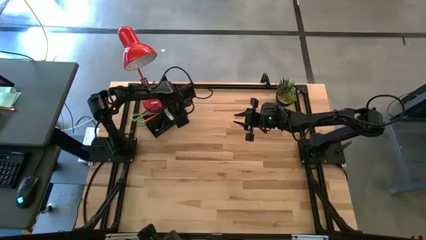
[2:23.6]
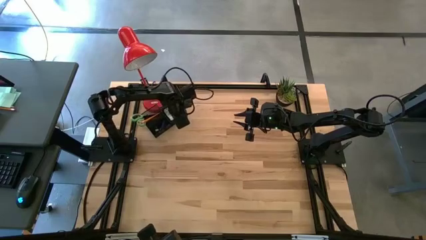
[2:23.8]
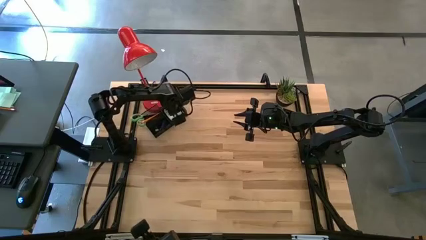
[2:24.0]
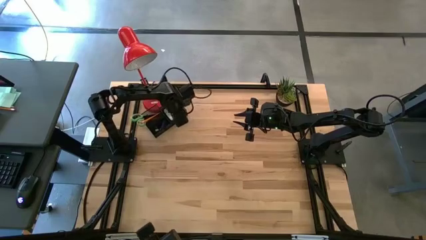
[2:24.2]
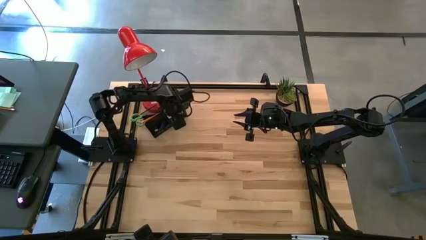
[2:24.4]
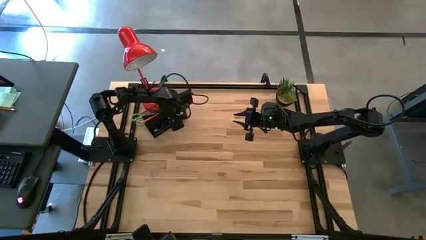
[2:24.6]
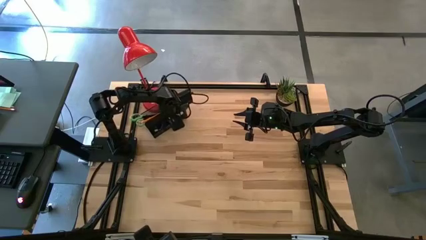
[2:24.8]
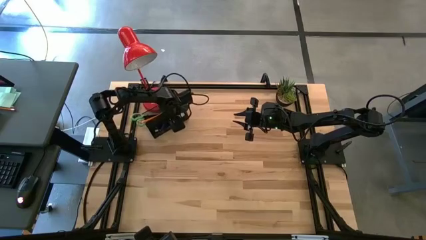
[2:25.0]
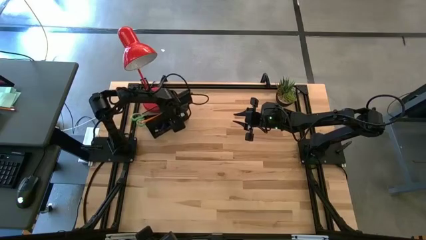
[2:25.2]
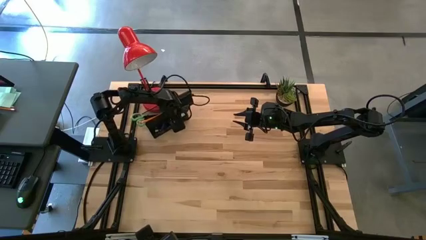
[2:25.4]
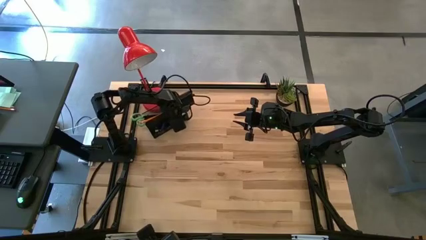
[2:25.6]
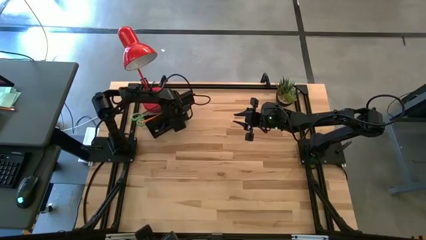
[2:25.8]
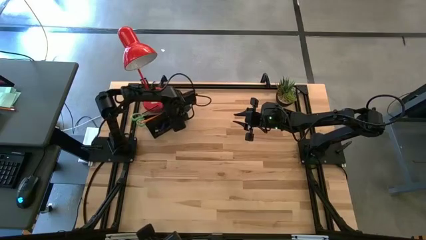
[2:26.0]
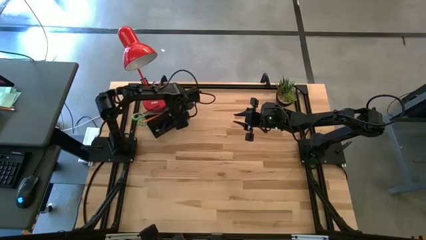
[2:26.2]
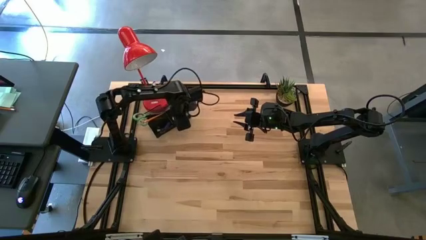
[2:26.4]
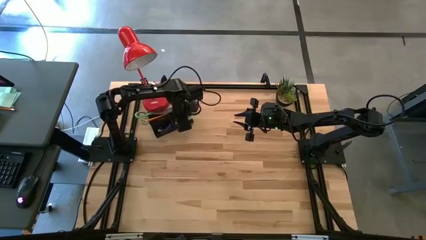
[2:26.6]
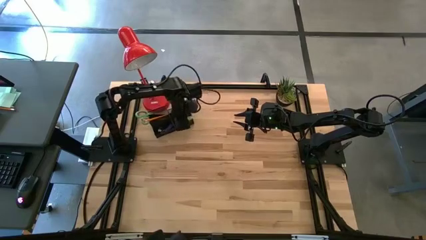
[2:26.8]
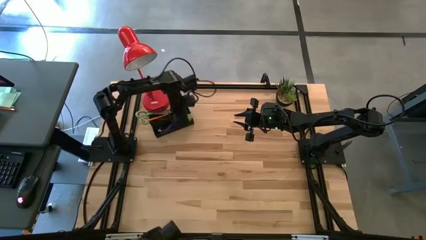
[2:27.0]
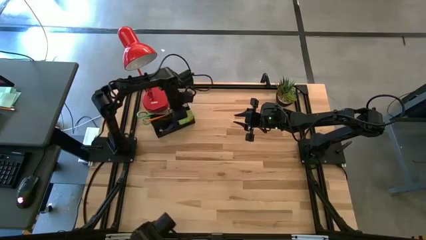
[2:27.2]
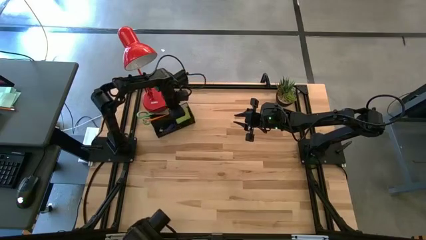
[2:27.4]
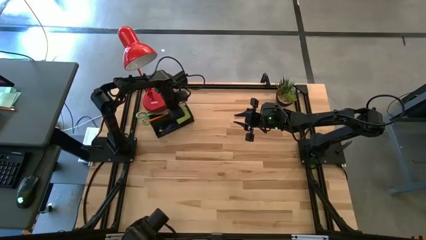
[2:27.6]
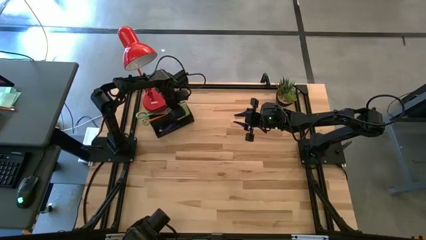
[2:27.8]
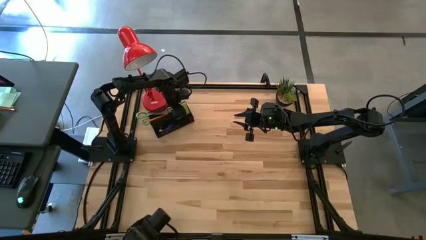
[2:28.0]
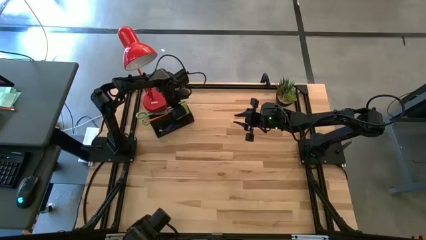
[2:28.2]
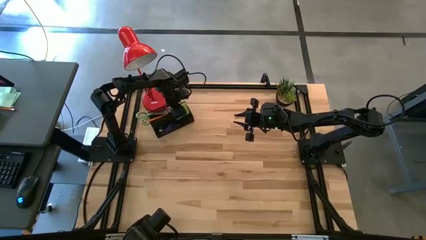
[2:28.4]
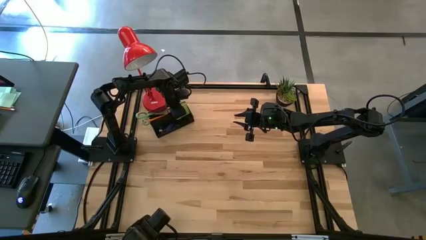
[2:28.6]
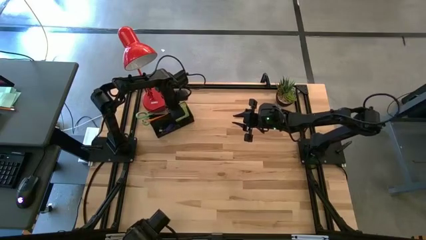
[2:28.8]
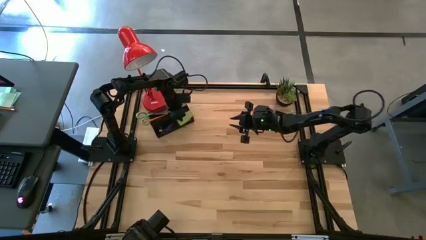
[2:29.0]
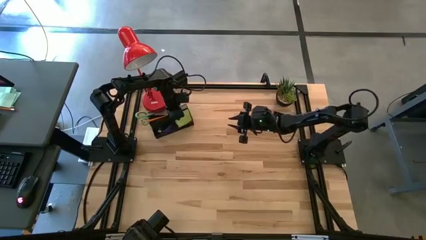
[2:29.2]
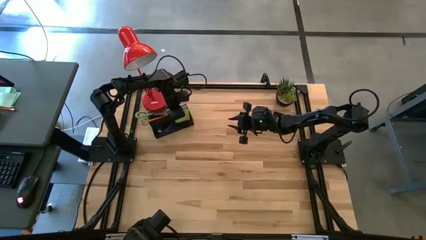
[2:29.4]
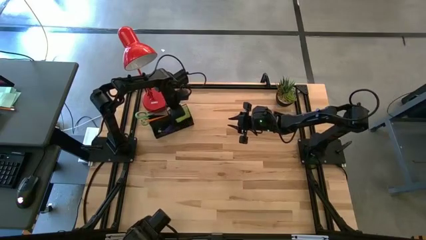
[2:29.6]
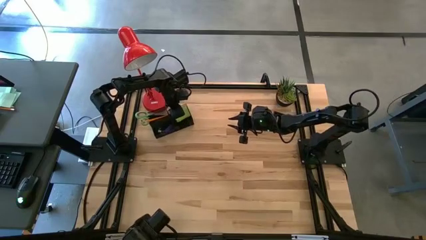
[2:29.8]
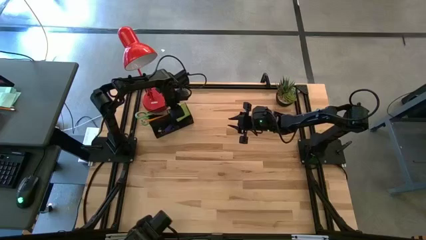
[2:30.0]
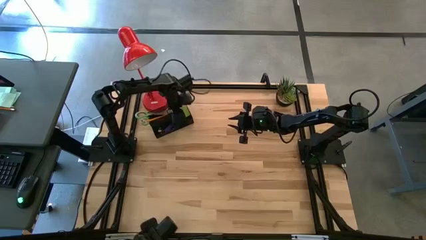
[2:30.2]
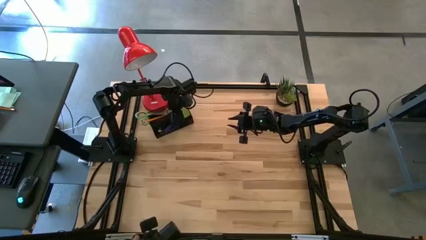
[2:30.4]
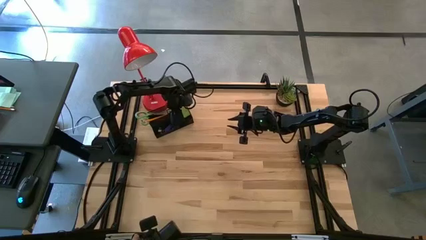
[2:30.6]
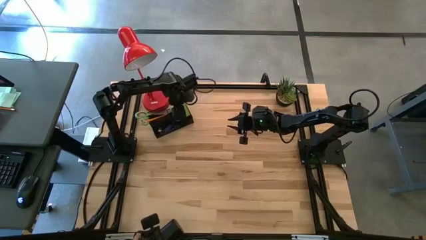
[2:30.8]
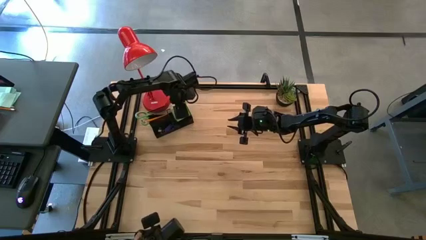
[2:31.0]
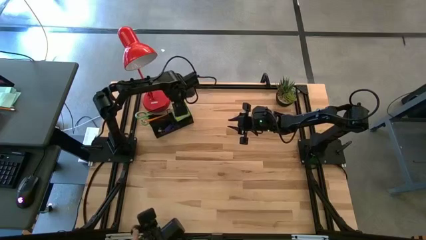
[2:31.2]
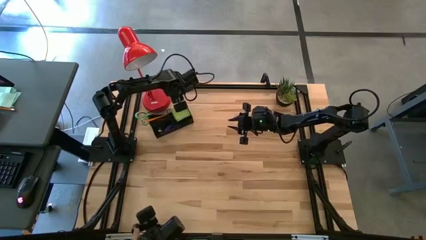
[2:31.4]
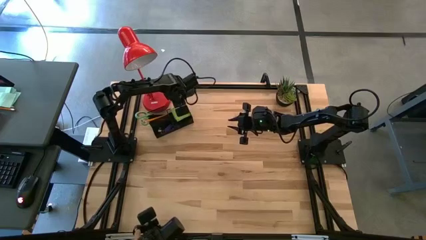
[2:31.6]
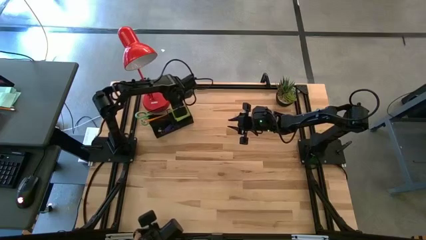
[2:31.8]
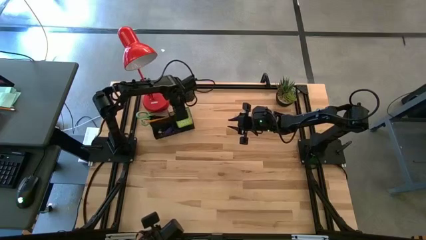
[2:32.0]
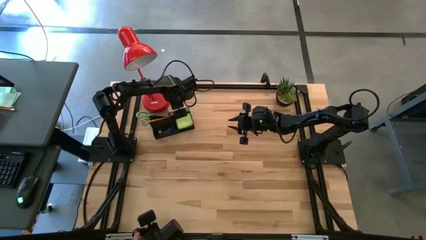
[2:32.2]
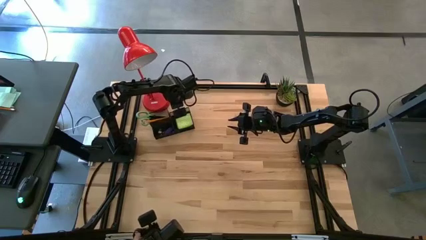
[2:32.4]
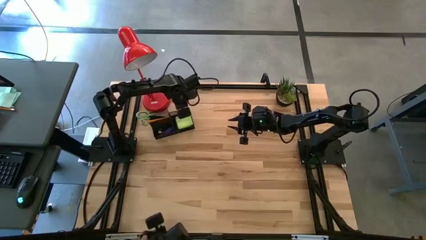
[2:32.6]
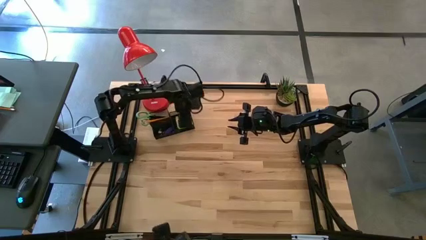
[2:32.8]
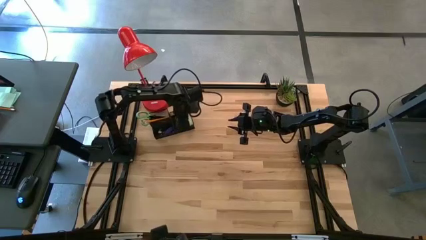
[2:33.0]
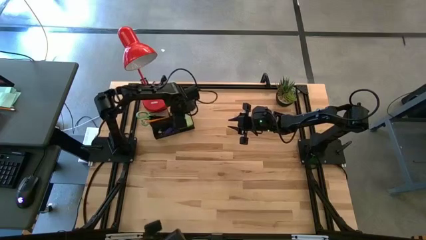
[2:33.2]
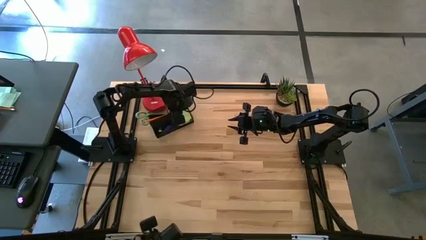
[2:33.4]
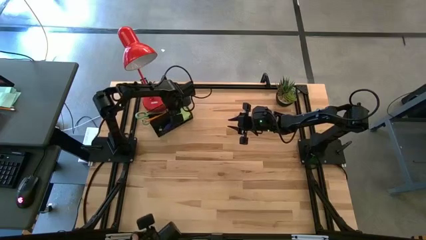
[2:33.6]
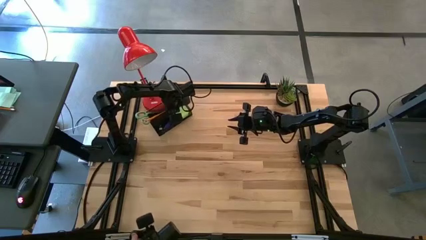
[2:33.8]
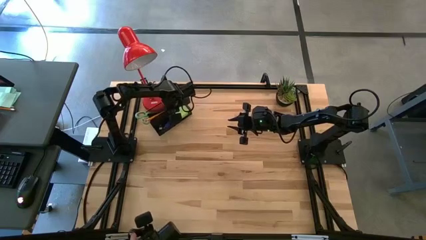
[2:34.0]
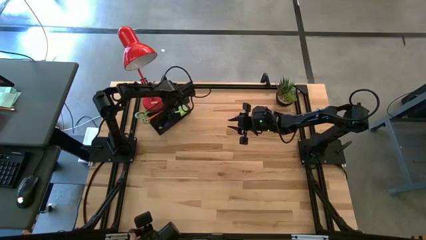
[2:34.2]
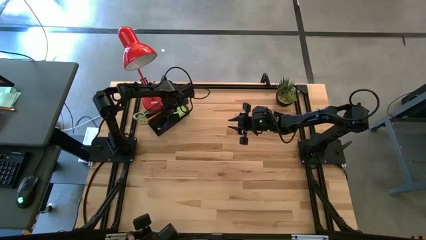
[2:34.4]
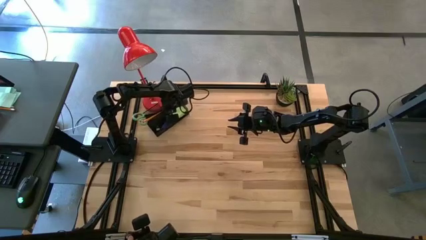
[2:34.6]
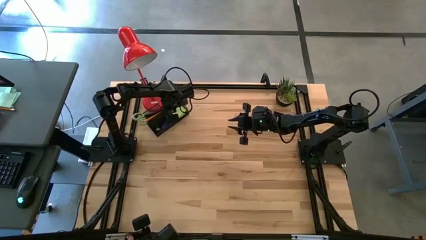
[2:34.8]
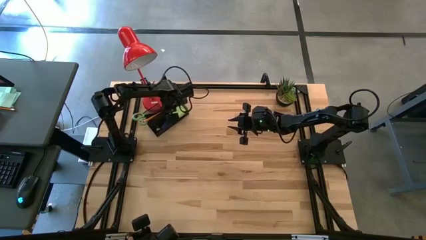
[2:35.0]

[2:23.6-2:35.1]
Task: Pick and place office supplies into organizer
Adjust the green sticky notes in the desk organizer

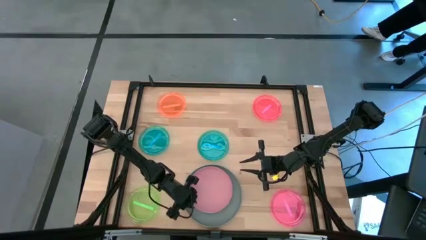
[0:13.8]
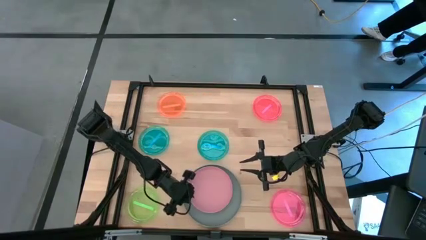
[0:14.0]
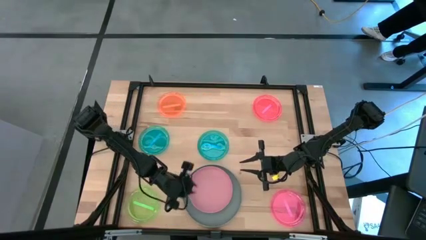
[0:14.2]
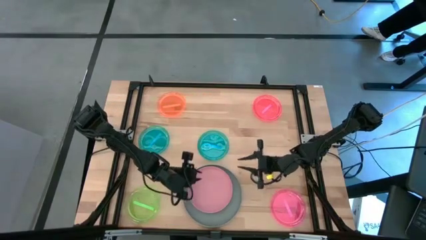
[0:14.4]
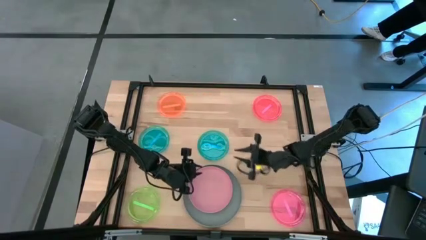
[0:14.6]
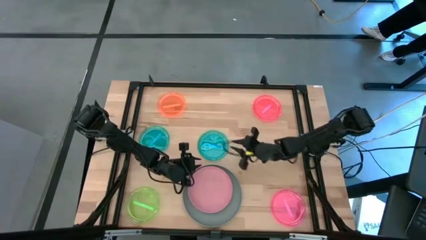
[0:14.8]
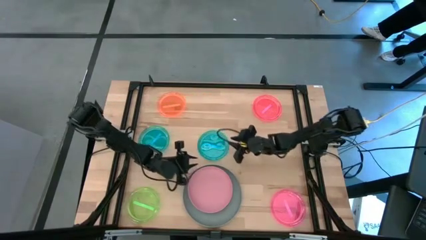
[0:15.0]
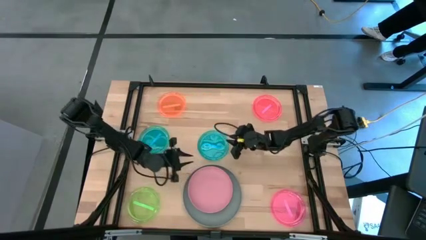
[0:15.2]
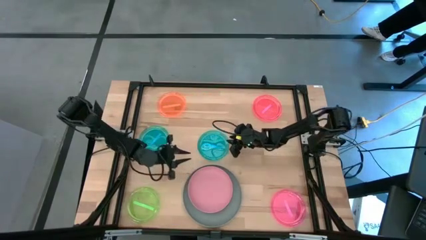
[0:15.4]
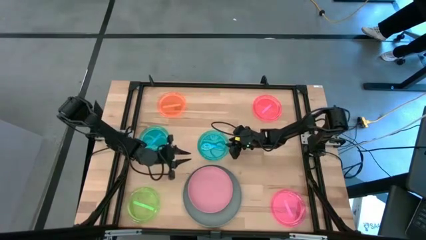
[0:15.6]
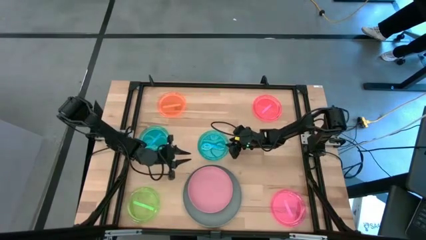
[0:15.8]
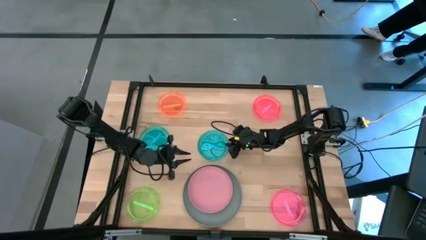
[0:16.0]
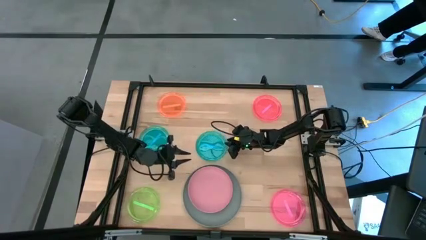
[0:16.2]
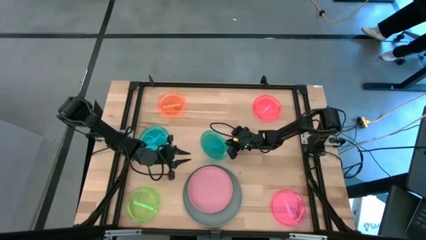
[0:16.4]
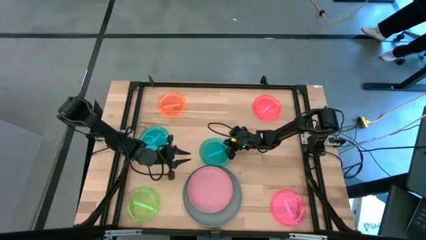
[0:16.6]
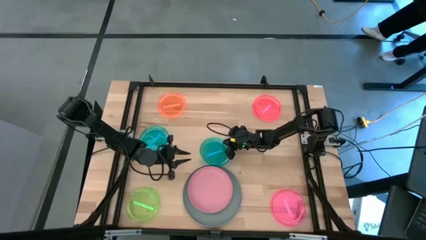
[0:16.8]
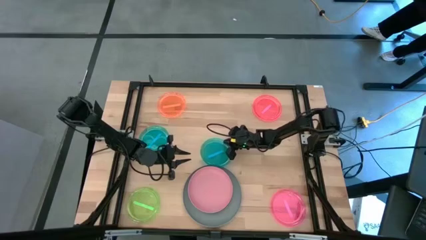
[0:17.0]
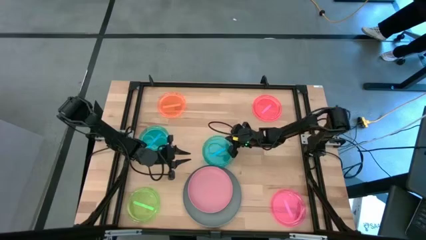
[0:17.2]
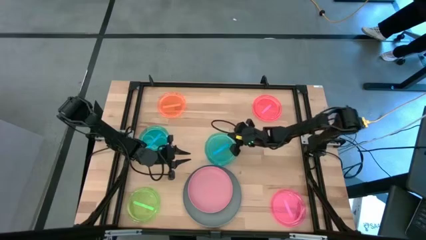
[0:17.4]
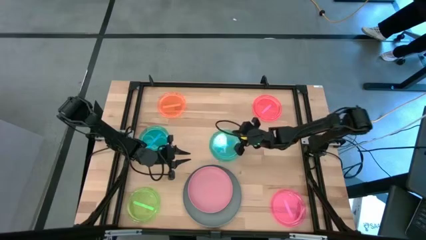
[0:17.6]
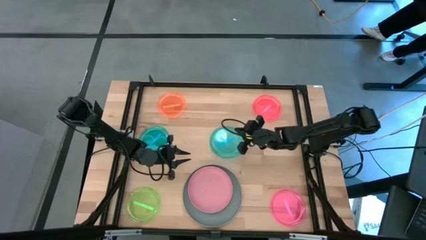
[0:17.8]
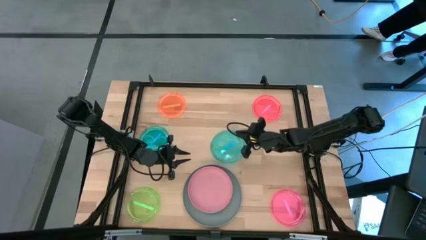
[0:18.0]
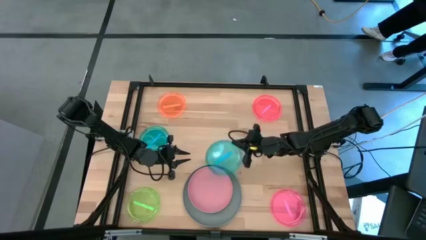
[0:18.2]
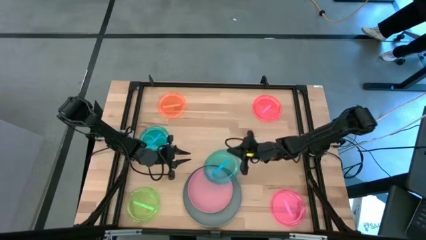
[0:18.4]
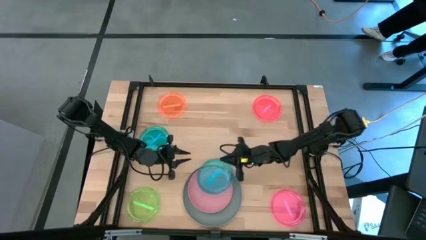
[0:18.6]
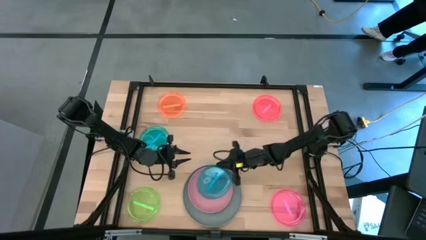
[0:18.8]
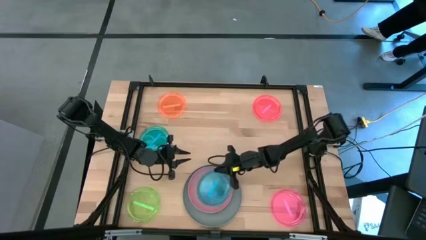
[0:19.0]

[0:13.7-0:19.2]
Task: Stack plastic plates
Stack the right blue plate on top of light pink plate
